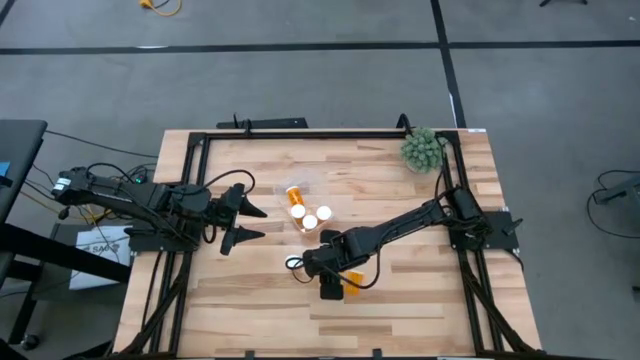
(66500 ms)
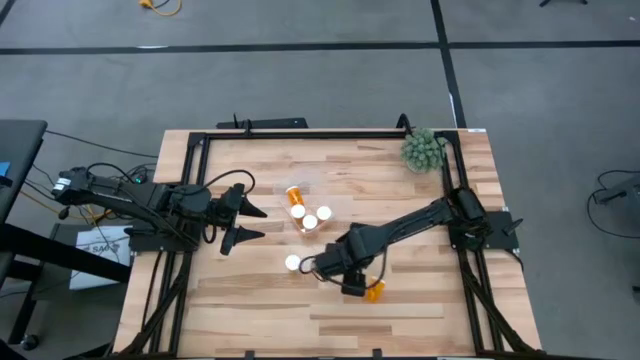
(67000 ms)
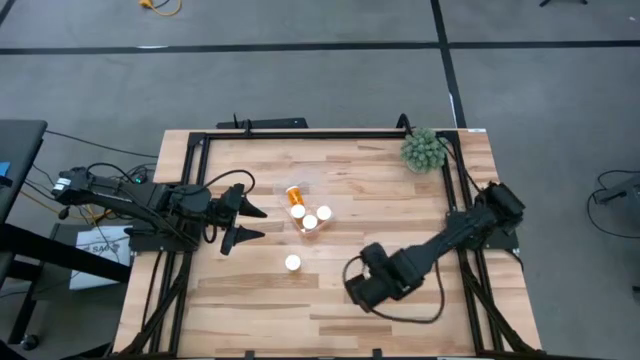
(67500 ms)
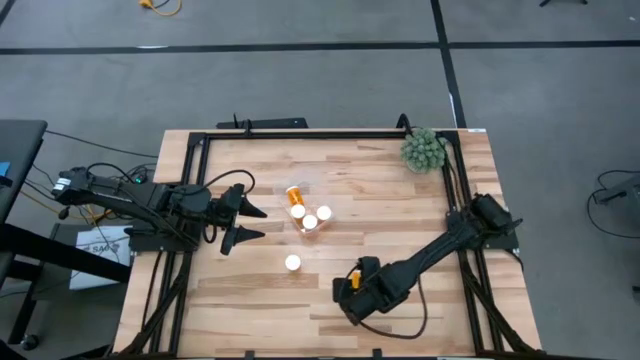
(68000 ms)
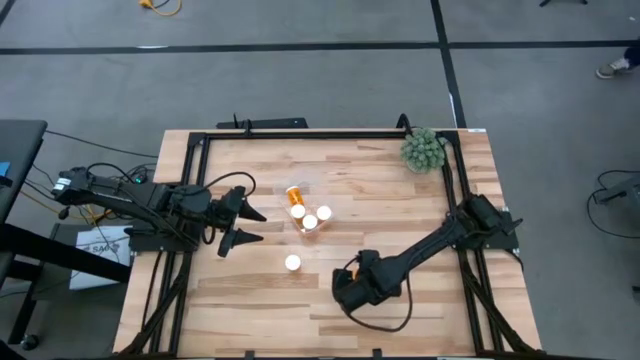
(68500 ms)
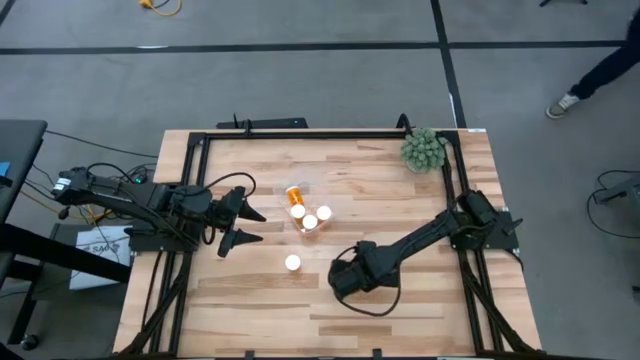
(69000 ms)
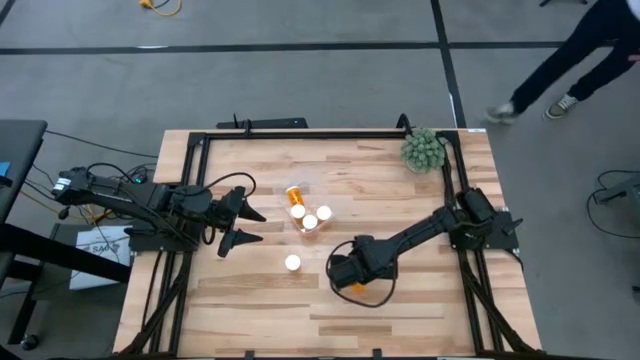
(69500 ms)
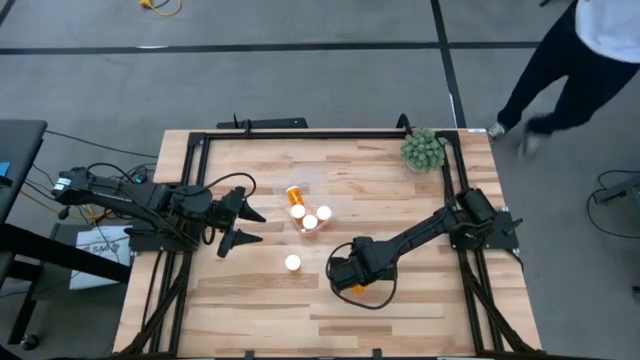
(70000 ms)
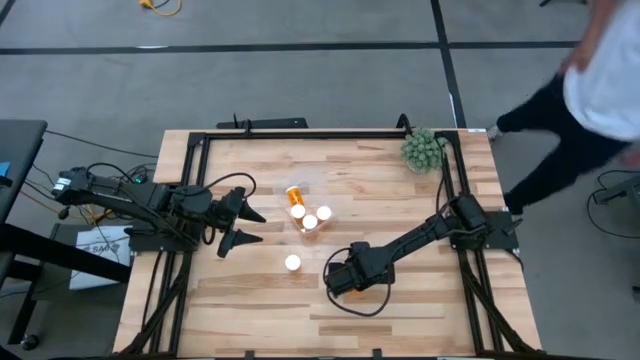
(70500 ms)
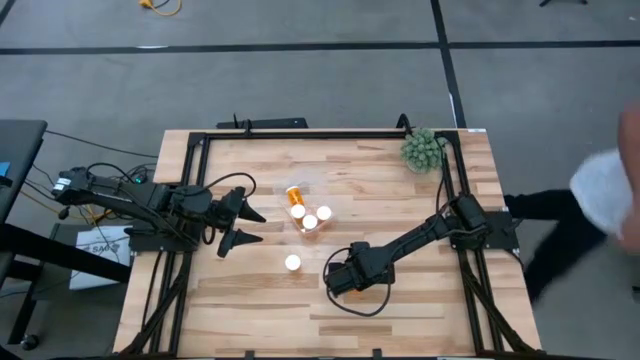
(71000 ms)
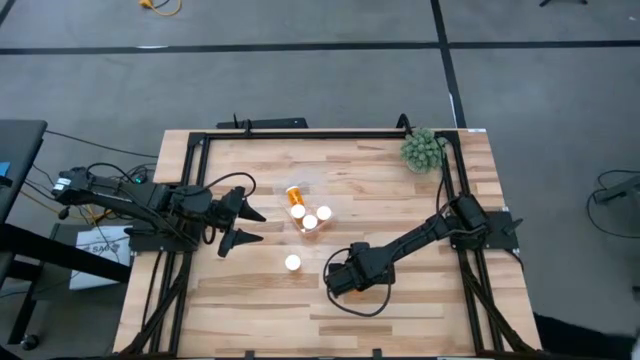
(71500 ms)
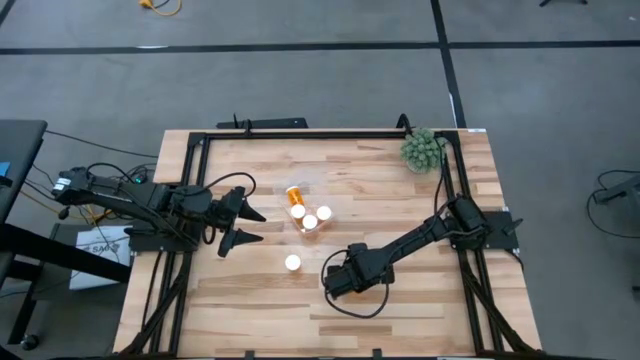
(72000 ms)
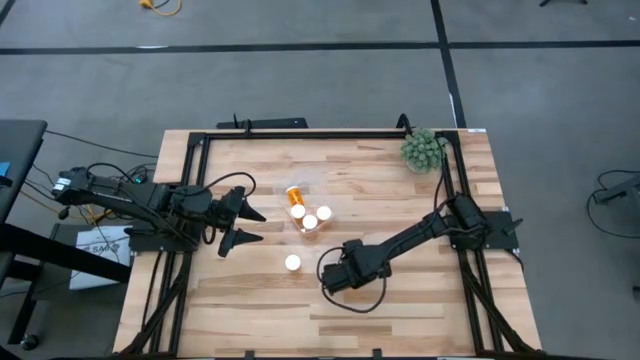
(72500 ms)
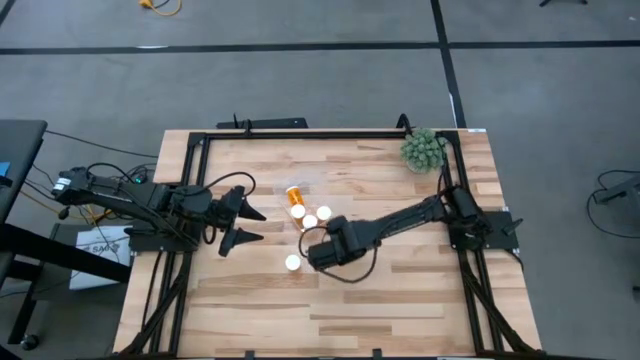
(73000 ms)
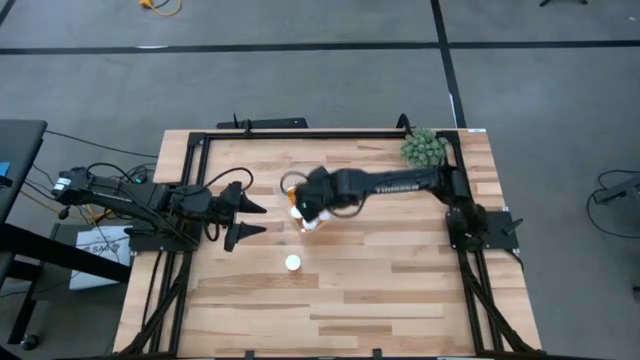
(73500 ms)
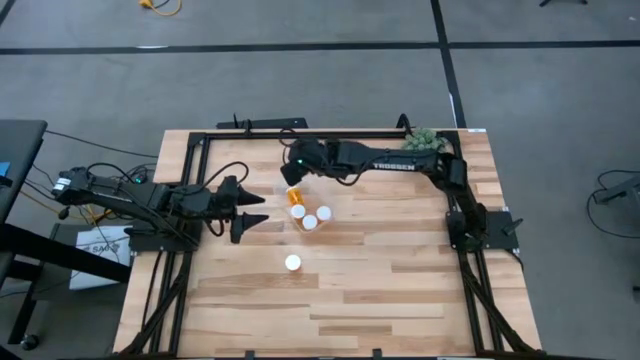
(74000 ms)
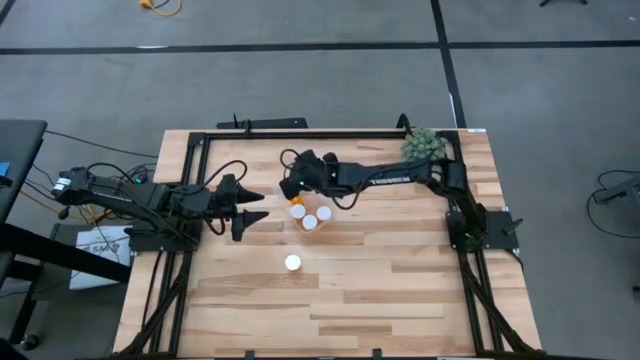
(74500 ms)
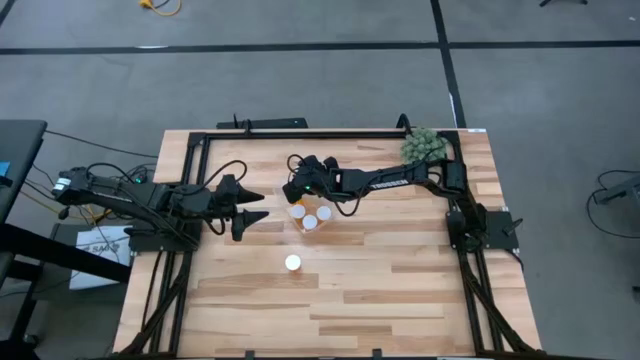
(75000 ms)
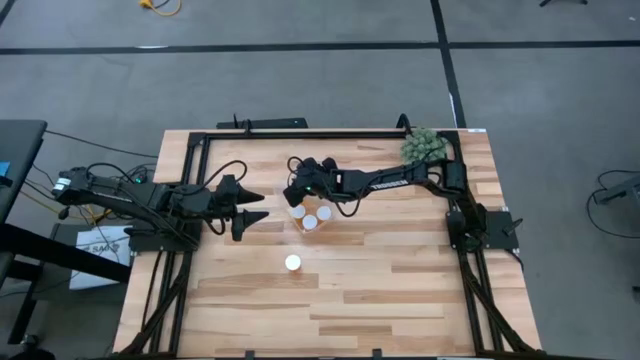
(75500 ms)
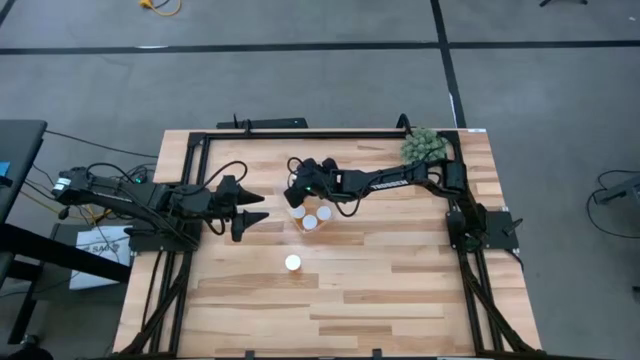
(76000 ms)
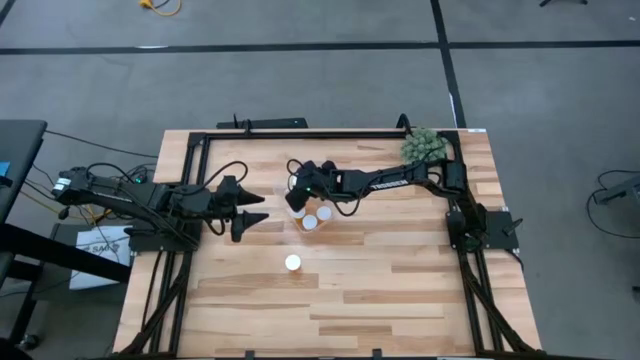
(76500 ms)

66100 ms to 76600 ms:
Task: Pick and place pill bottles into a basket
Put the bottom orange medicine bottle into the transparent bin

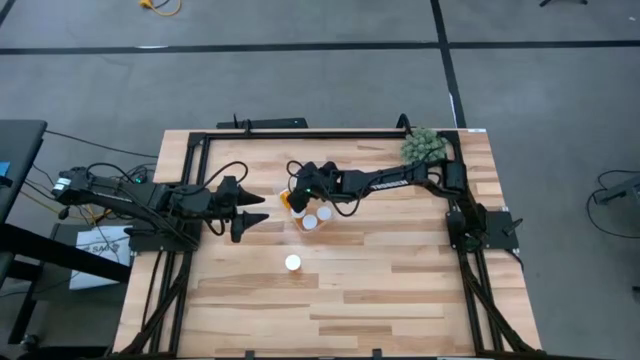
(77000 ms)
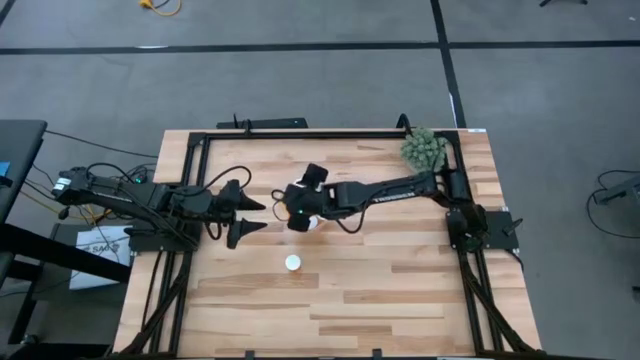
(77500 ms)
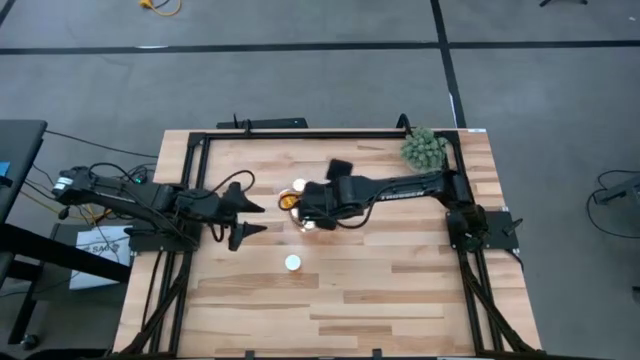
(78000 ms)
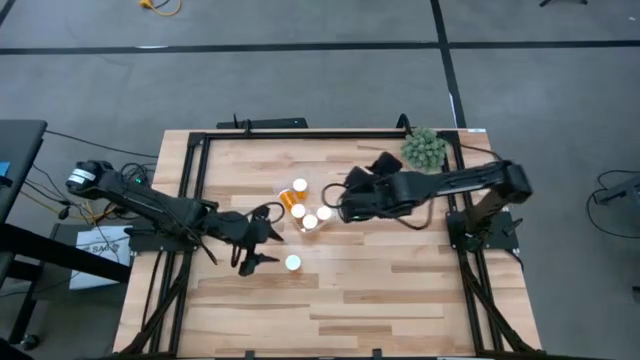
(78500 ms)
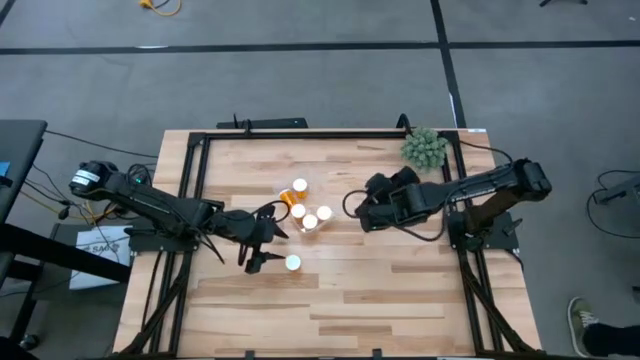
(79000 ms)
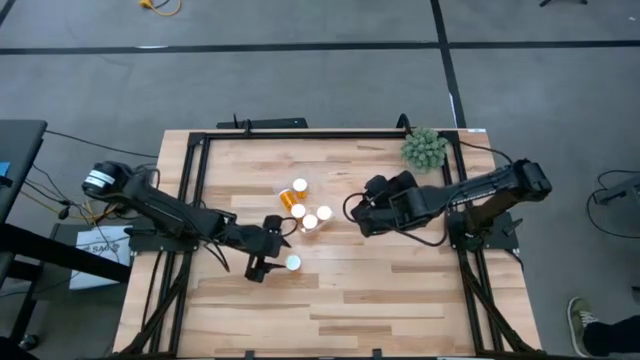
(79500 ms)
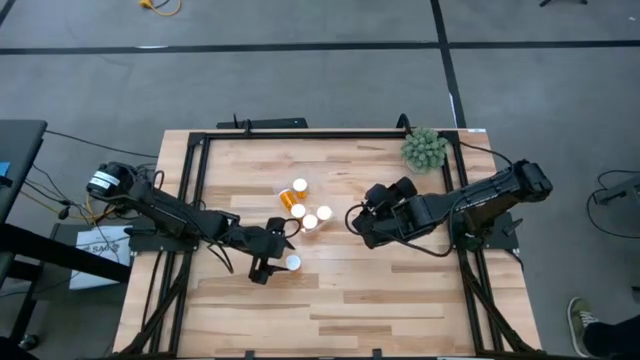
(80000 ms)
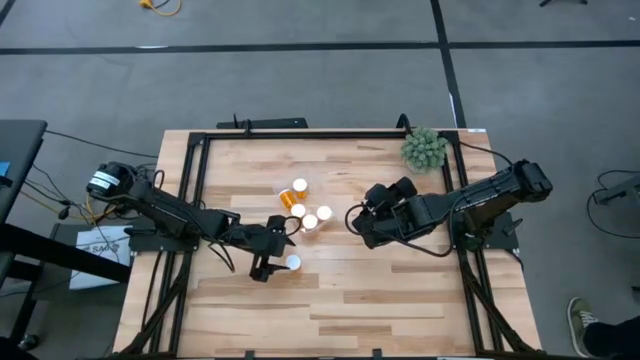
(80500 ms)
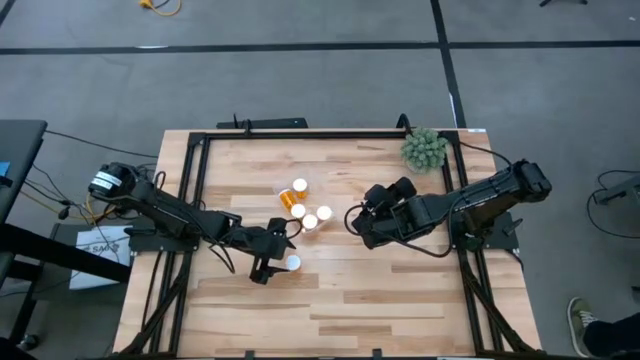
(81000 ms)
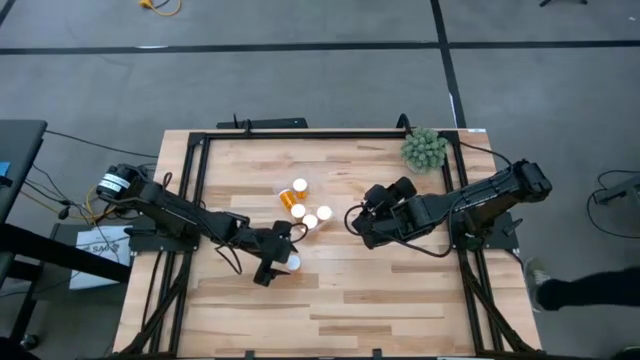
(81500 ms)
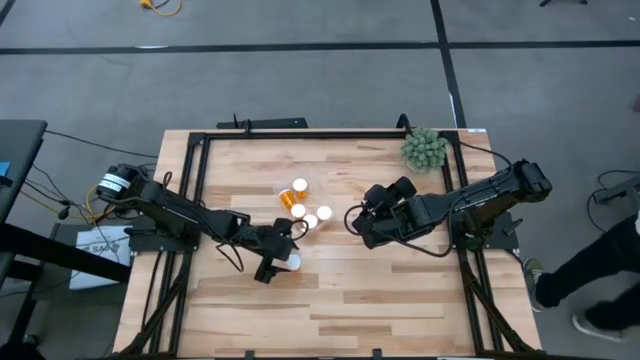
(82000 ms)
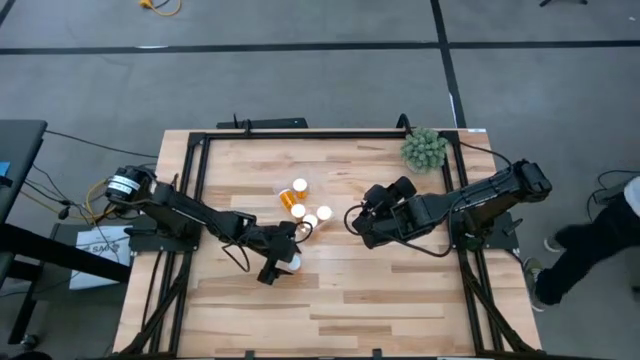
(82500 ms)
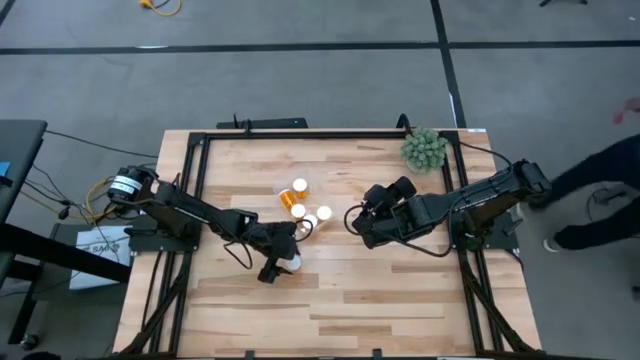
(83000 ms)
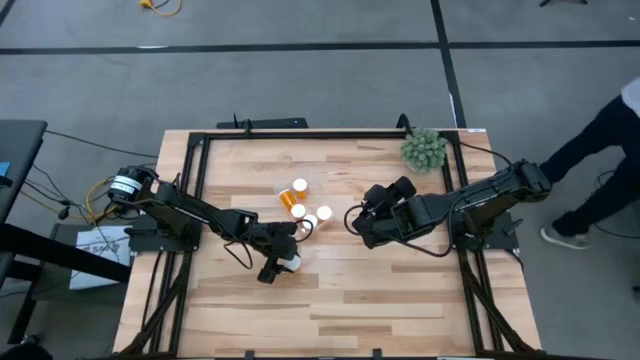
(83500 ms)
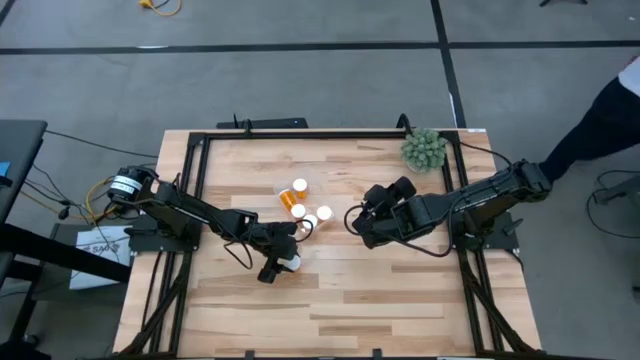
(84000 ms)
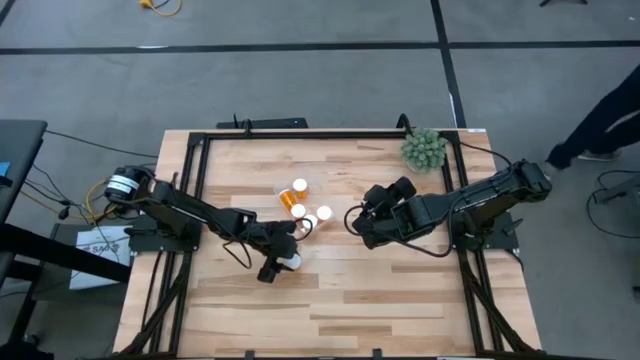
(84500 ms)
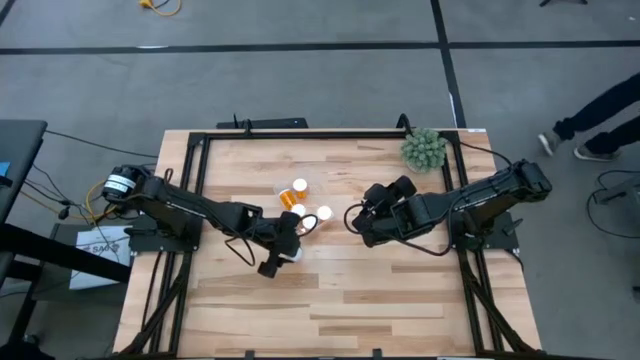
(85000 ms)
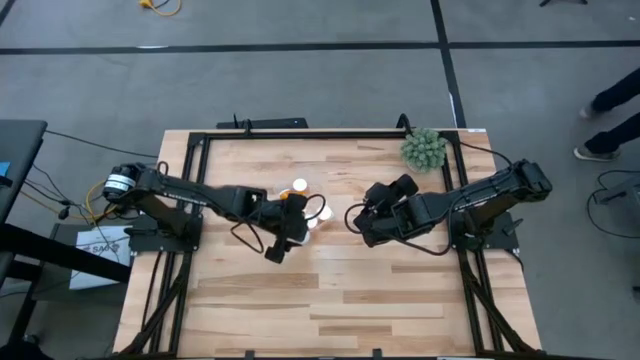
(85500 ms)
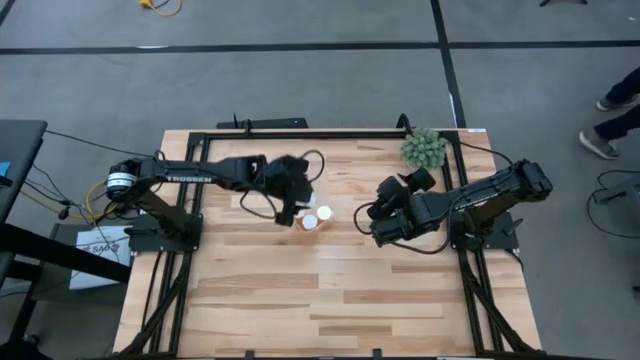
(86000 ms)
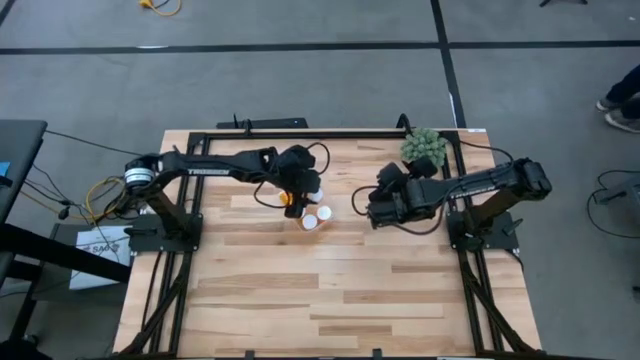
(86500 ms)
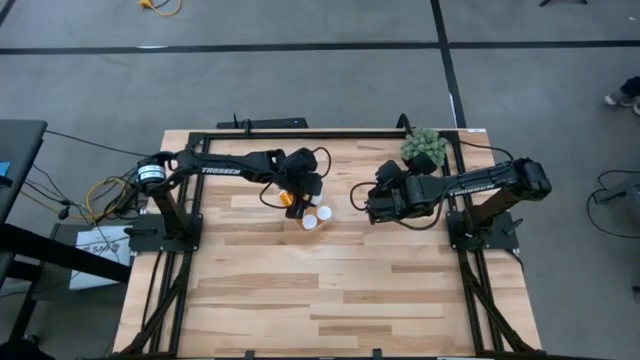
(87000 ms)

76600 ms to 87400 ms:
Put the orange medicine bottle into the transparent bin

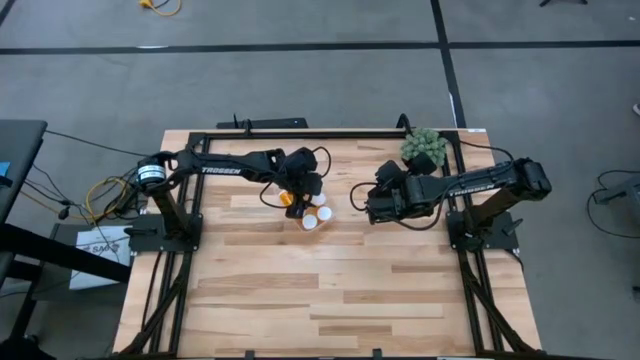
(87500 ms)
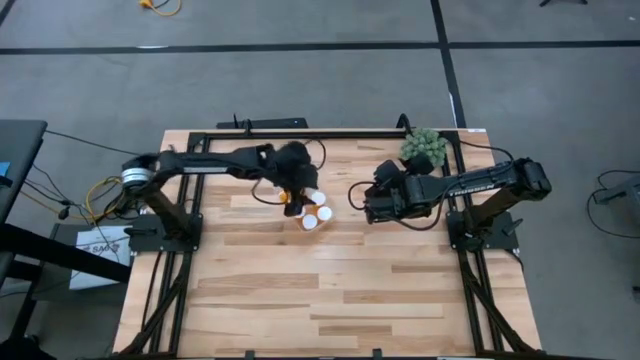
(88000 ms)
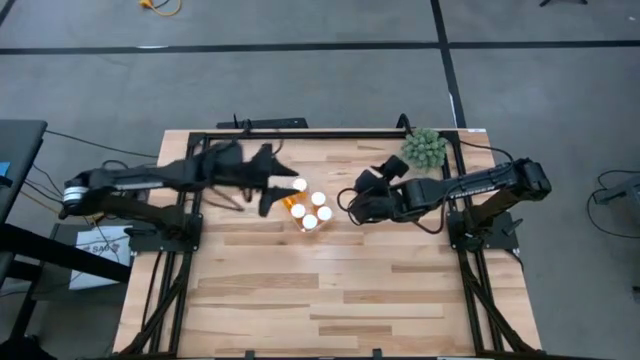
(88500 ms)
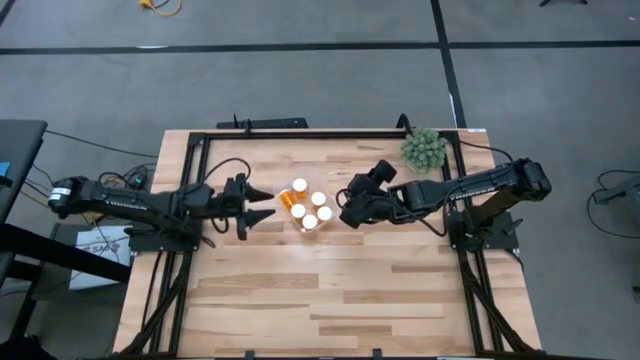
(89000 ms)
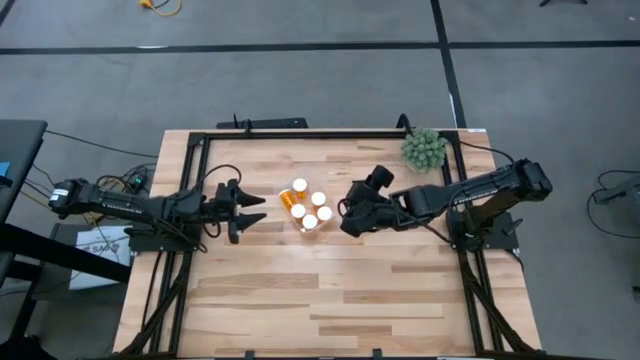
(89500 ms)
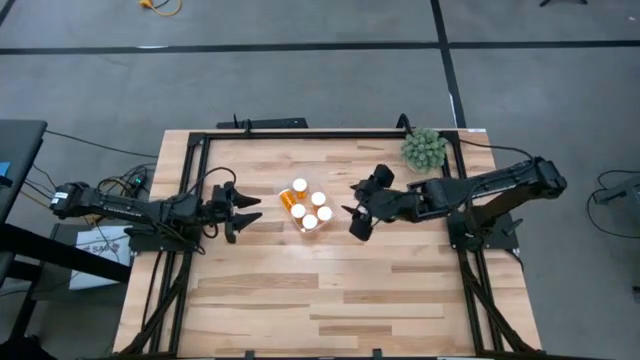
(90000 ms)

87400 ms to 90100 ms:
Return to Home Position
